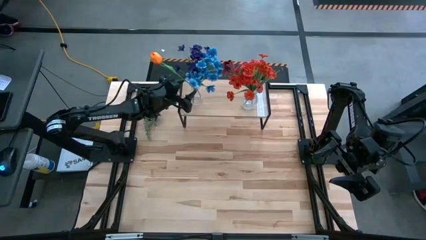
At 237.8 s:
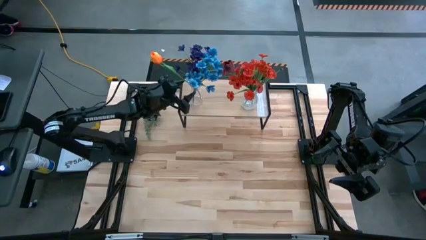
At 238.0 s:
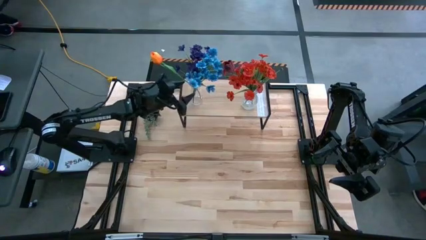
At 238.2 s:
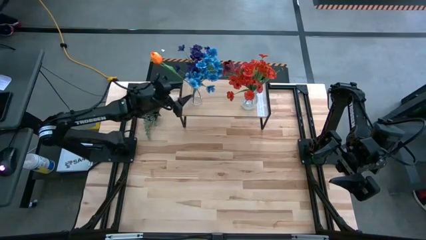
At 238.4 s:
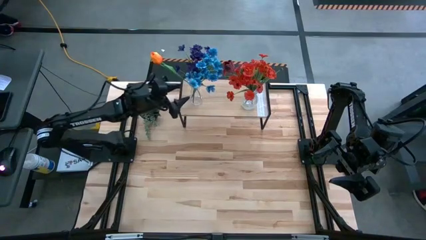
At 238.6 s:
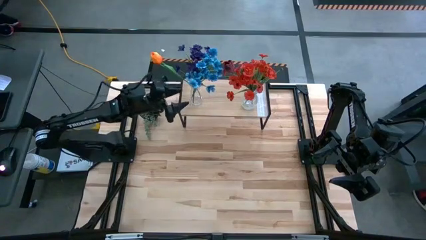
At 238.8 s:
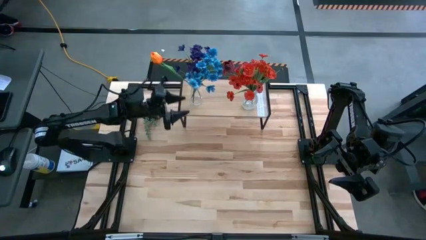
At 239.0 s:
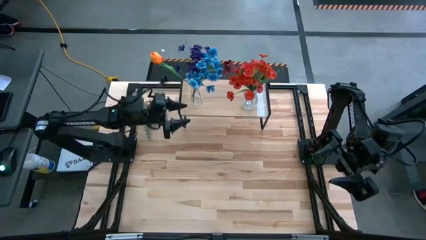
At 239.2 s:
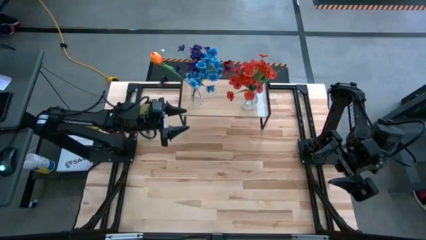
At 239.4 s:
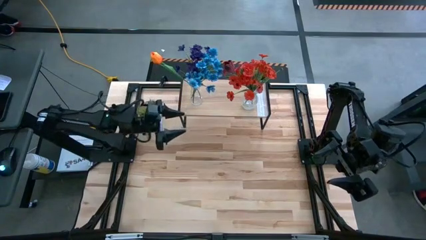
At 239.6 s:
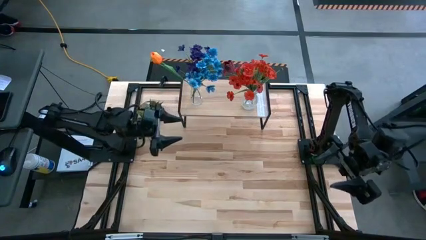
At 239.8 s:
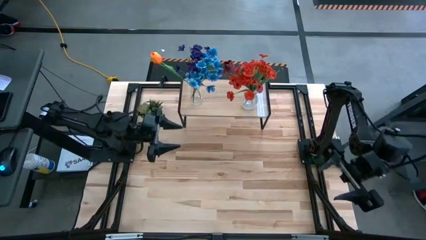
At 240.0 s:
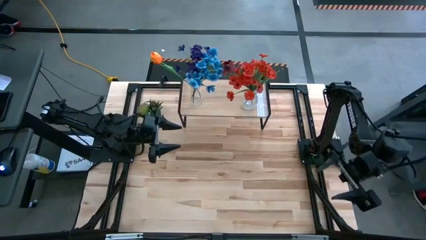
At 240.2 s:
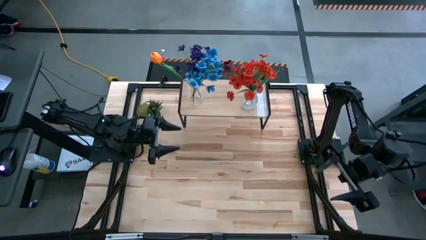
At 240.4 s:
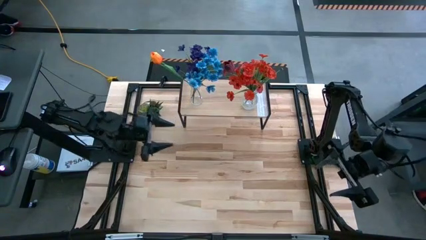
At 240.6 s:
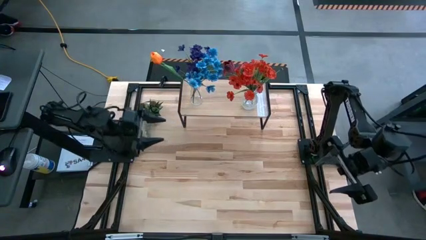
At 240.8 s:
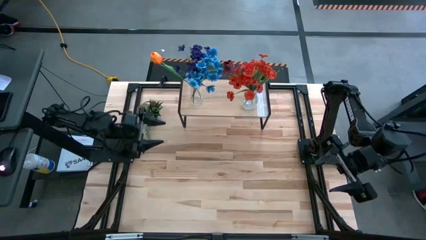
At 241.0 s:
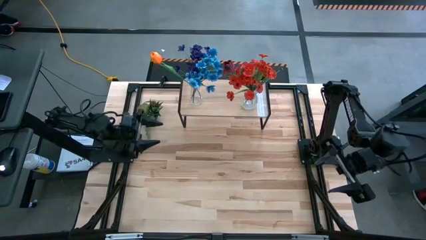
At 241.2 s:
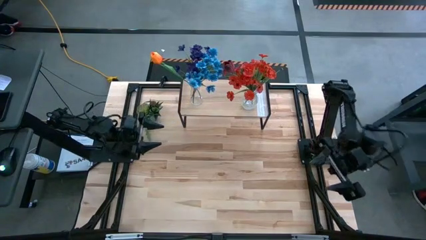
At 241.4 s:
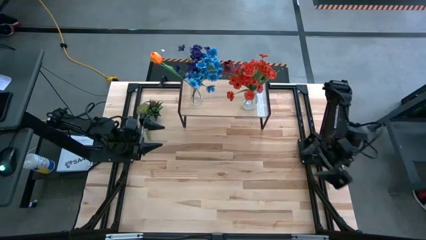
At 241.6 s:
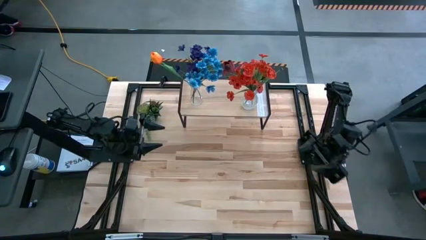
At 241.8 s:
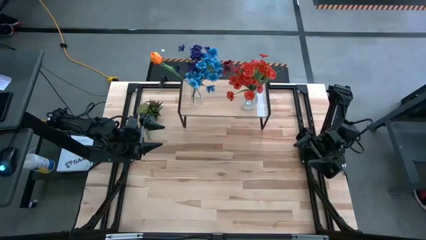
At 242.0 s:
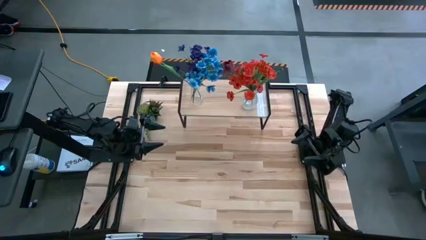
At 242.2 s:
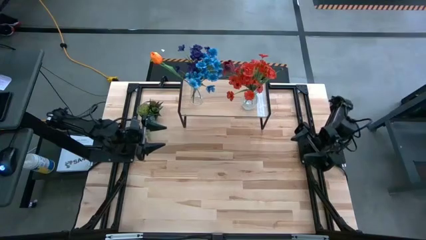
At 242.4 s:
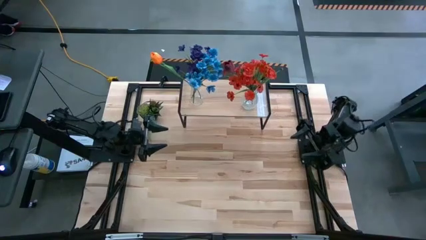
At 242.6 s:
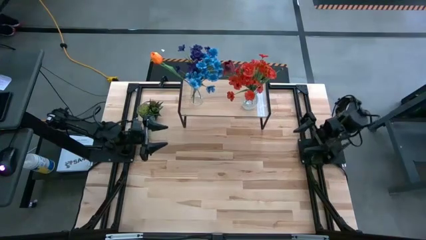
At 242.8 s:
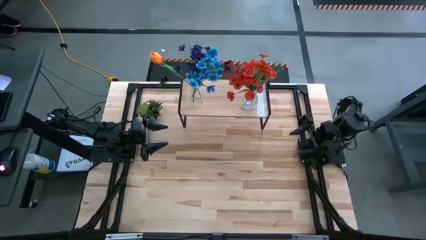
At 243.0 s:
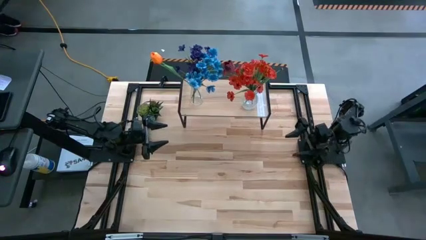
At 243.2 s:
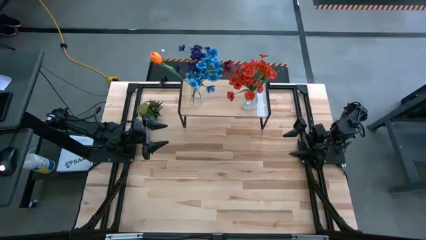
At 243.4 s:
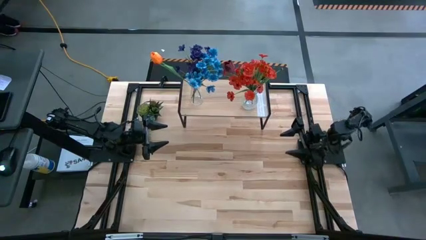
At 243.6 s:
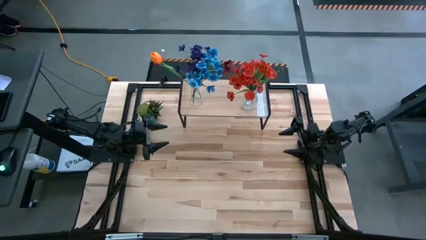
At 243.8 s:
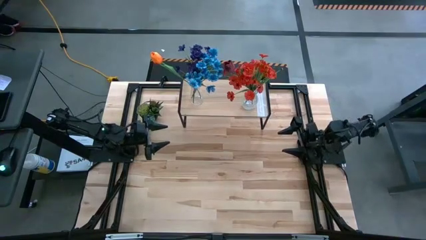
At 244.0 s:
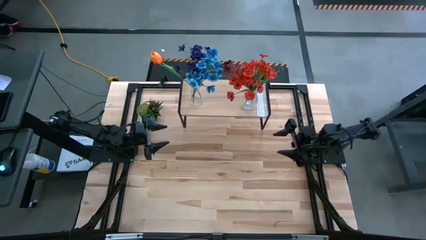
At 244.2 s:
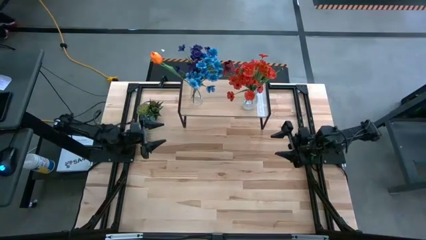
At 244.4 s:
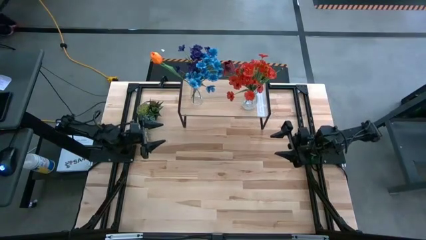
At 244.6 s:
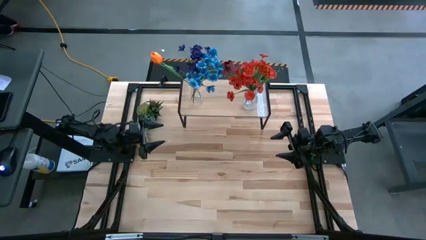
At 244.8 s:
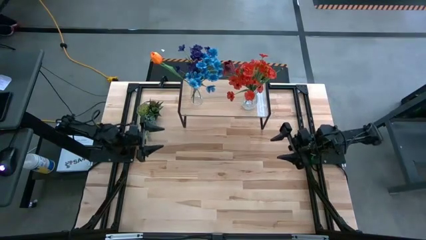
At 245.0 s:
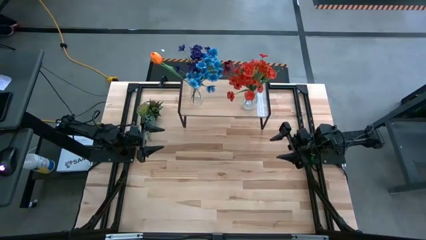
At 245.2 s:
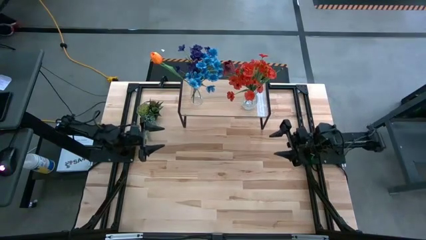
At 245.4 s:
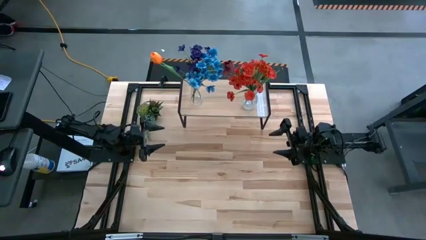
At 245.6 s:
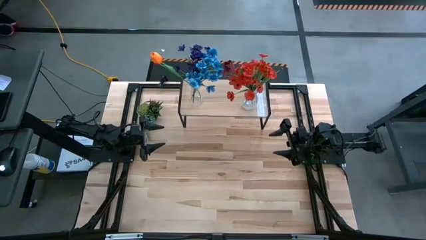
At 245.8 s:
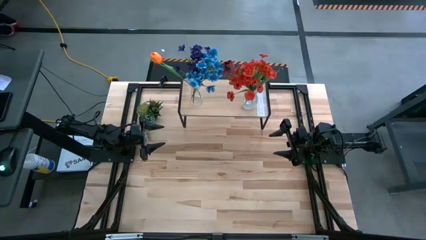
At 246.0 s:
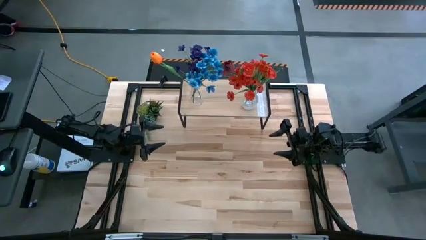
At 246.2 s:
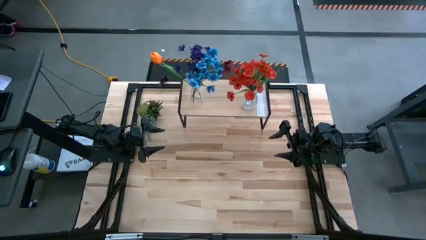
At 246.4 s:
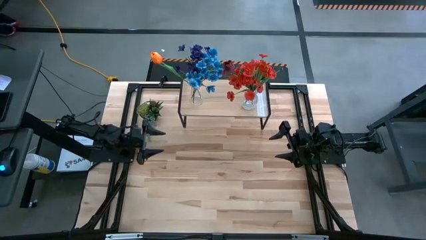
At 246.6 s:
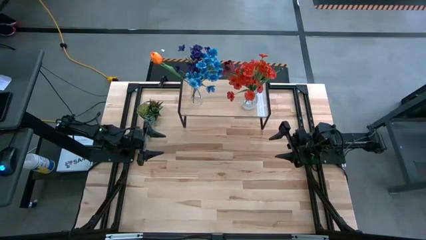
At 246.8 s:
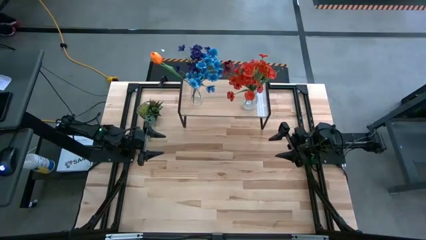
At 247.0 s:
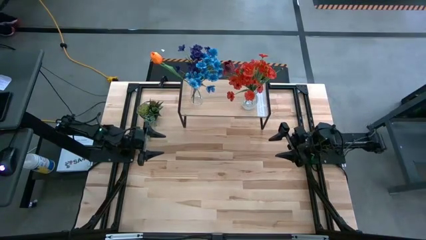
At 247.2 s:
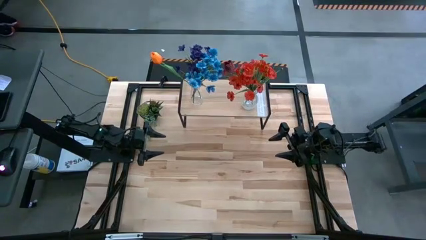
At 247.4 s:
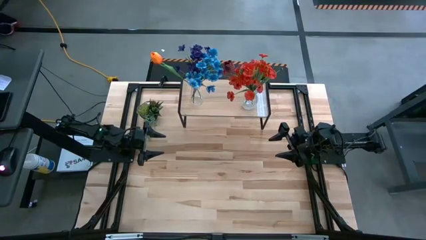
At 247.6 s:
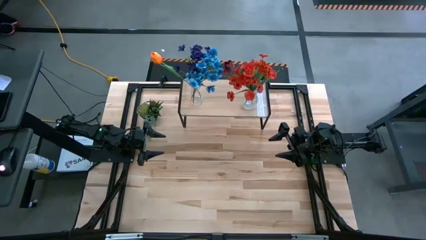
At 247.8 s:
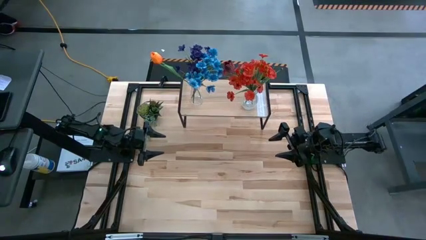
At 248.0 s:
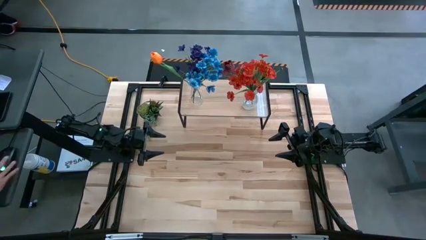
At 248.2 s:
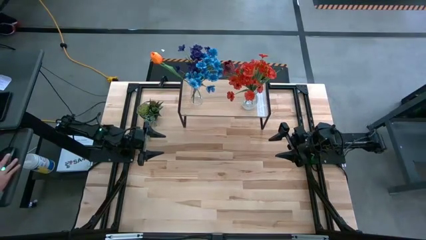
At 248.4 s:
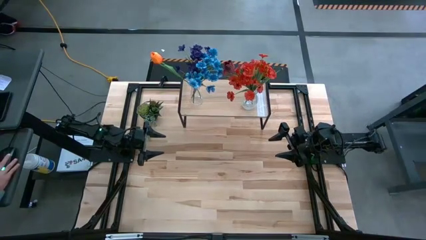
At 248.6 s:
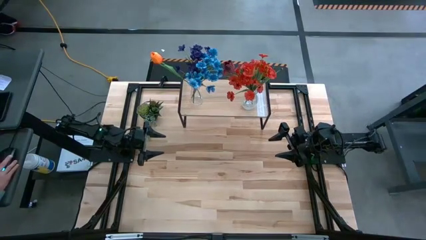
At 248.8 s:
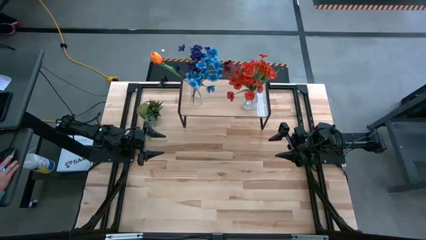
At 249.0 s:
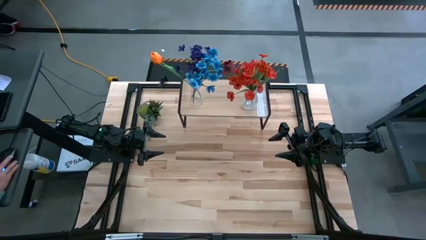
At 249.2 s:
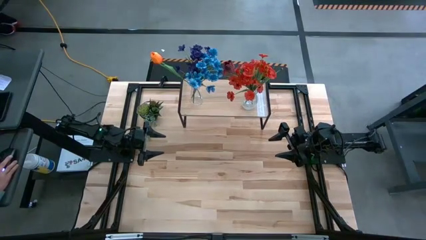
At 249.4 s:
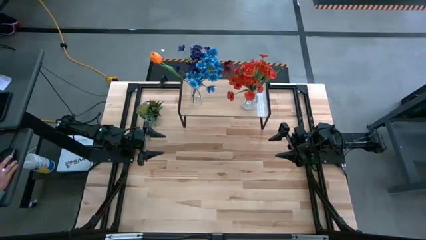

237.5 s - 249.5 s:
Task: Pick and place flowers into a vace then onto a shelf
Return to Home Position

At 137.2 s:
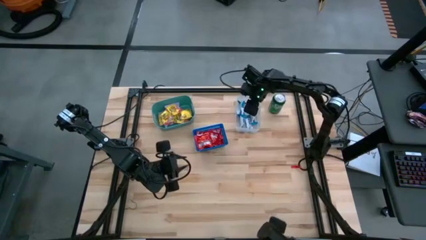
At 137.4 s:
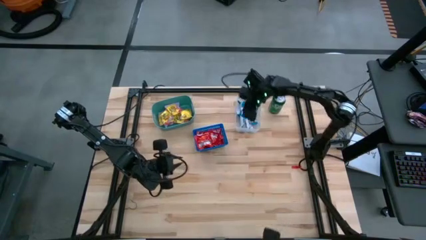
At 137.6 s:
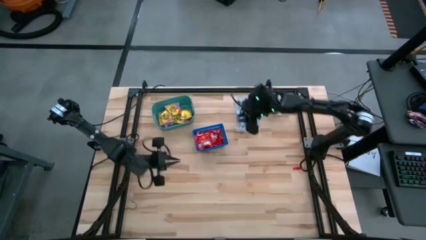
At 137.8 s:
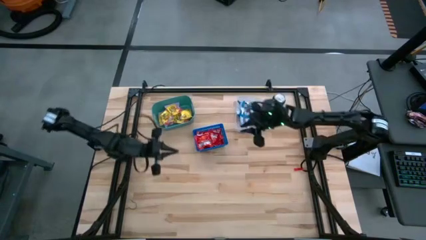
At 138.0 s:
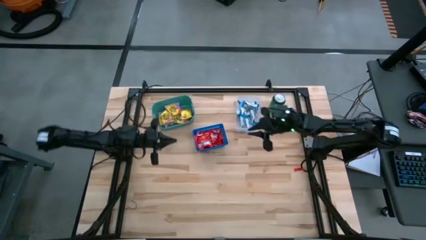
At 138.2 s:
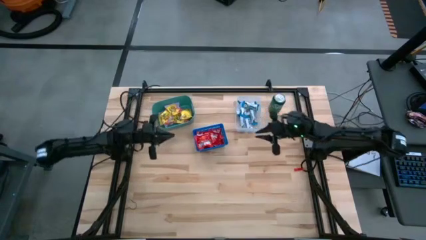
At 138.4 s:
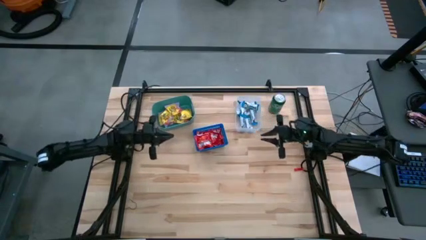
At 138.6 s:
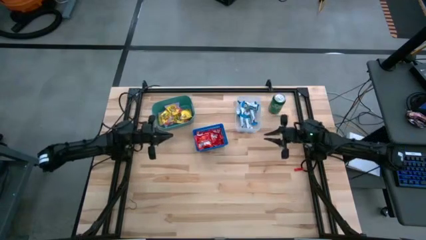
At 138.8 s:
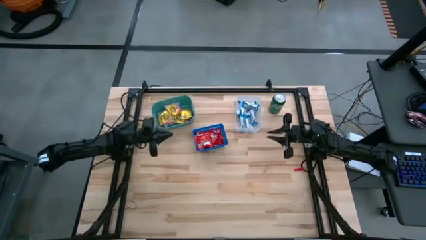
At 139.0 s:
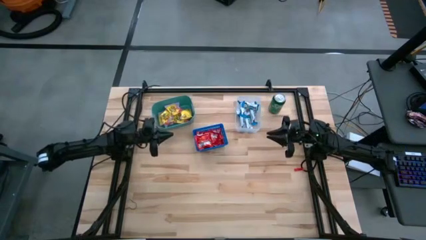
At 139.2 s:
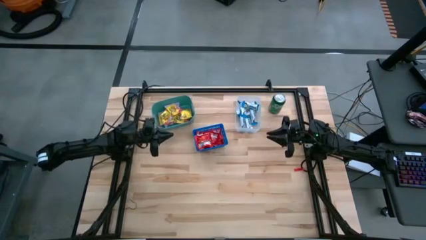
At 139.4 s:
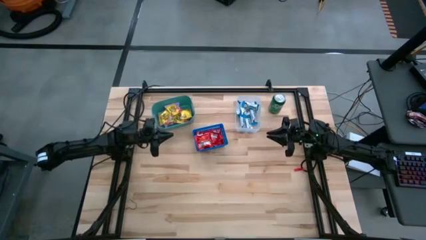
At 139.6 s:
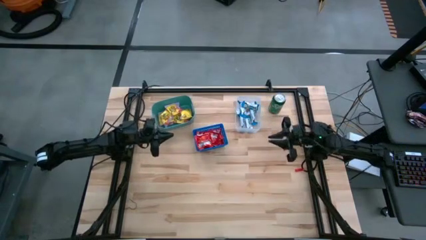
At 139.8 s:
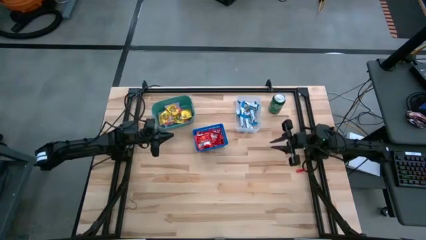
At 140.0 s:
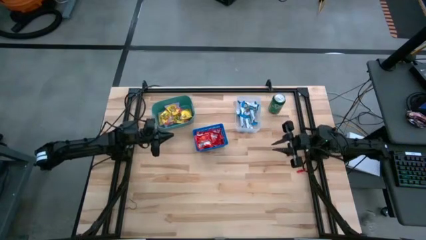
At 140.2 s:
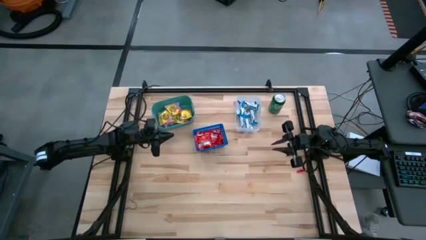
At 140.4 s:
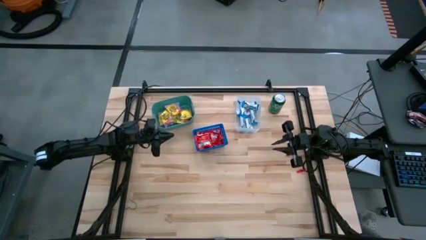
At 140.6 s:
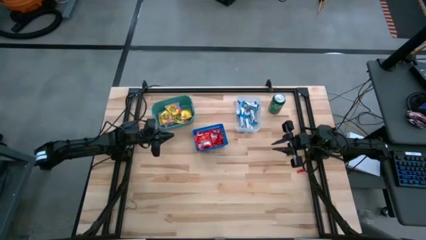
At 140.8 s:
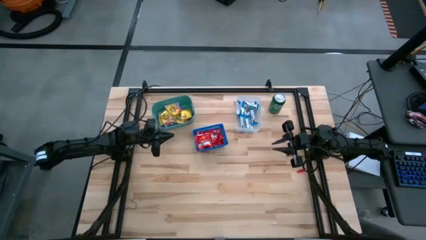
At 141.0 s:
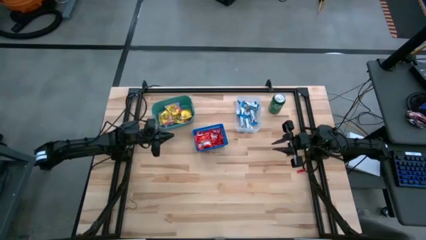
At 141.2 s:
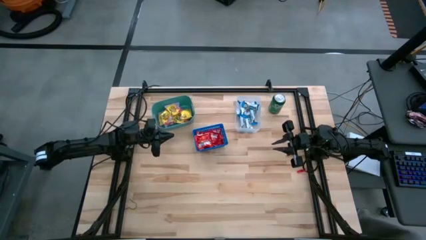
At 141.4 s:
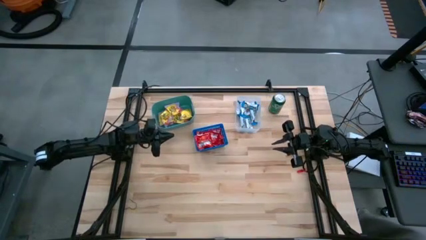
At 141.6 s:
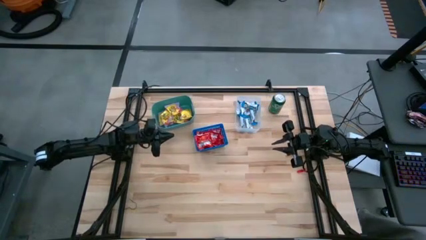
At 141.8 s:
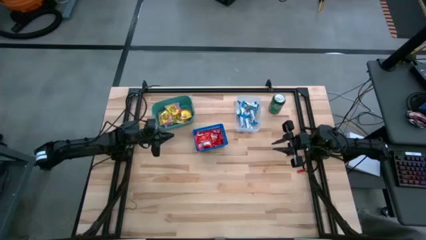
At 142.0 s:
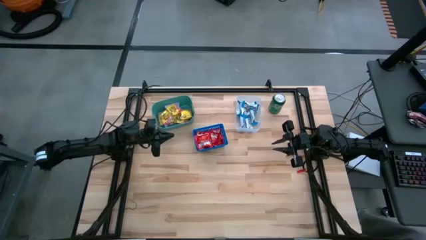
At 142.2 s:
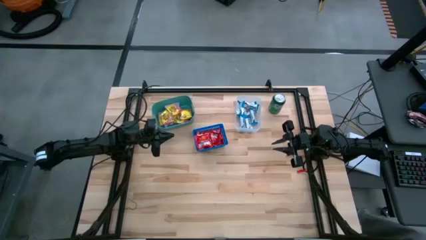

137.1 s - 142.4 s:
Task: Sort candy
Return to Home Position
